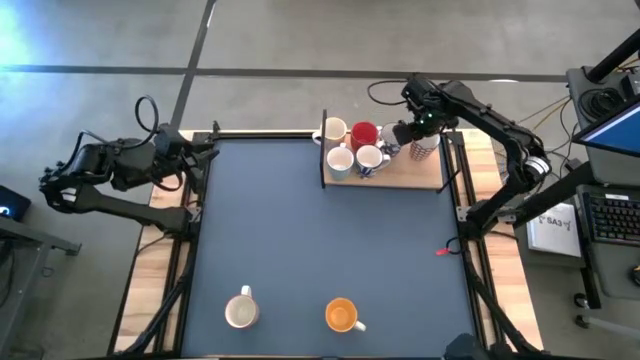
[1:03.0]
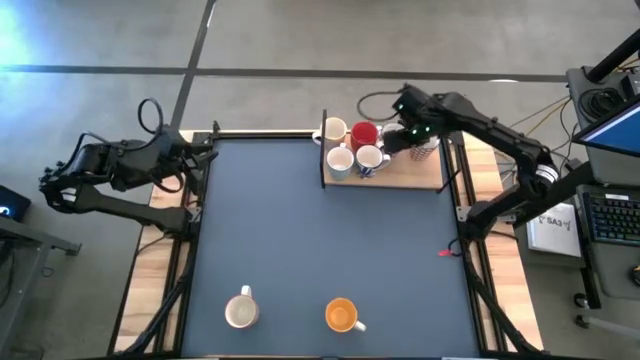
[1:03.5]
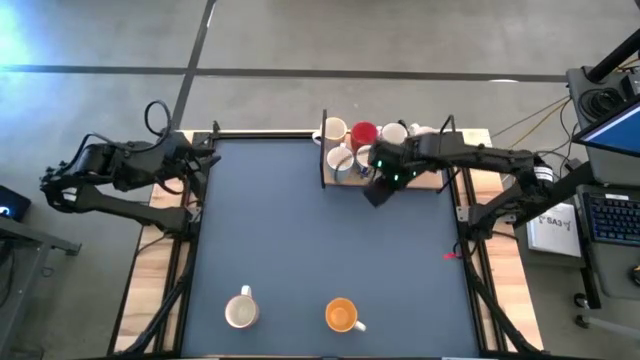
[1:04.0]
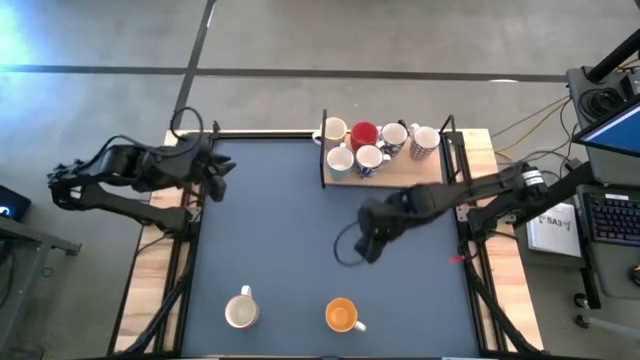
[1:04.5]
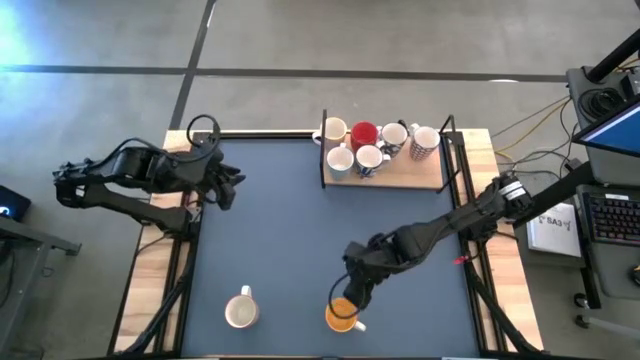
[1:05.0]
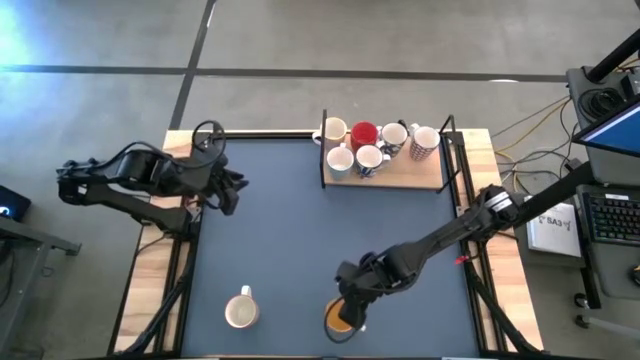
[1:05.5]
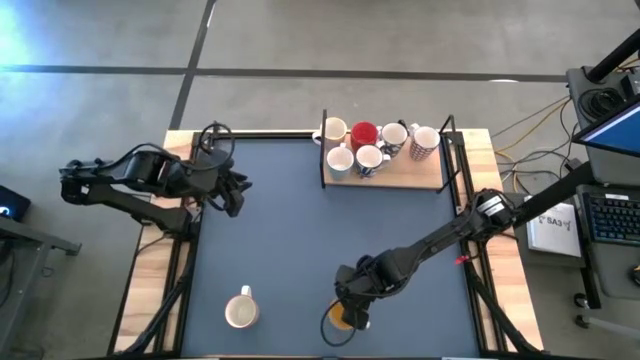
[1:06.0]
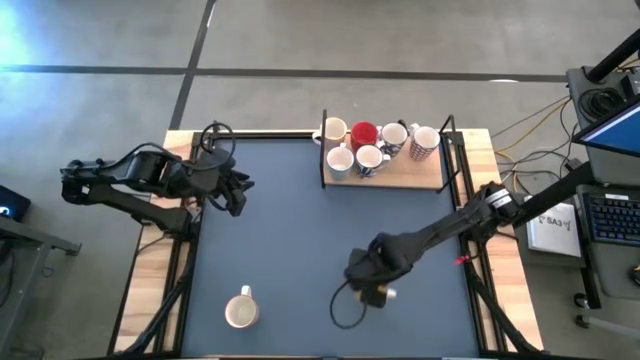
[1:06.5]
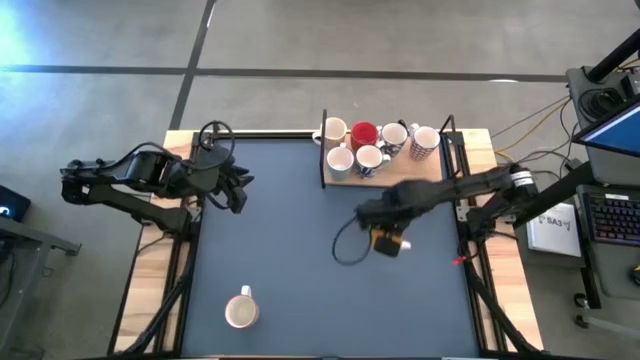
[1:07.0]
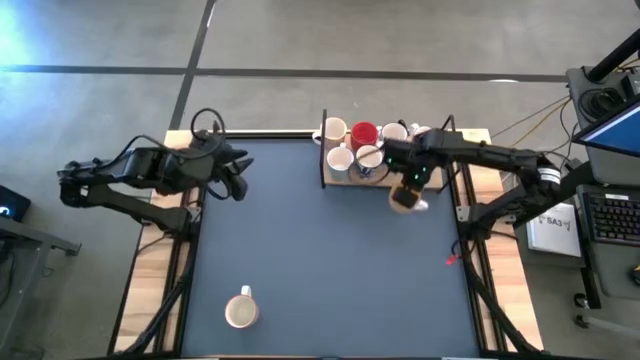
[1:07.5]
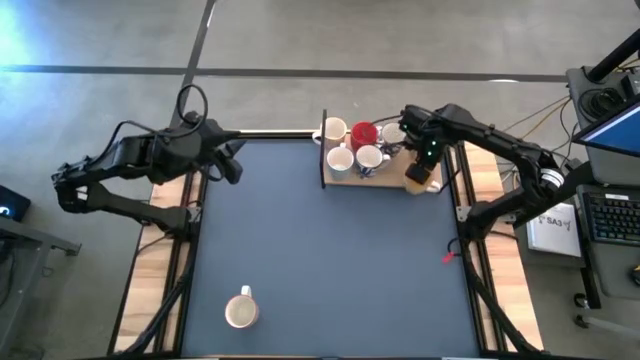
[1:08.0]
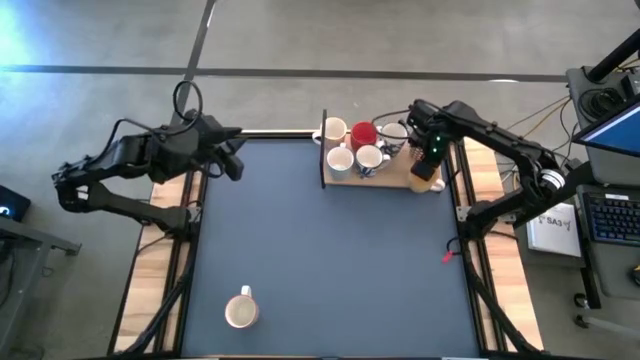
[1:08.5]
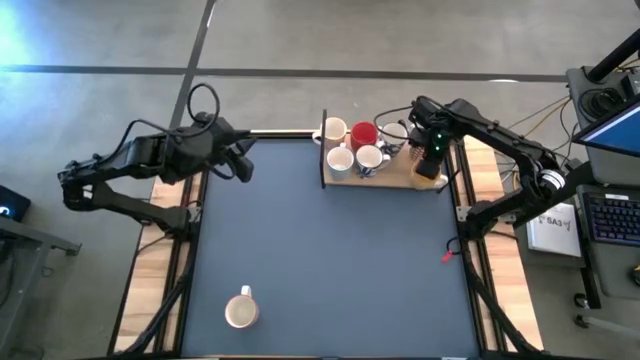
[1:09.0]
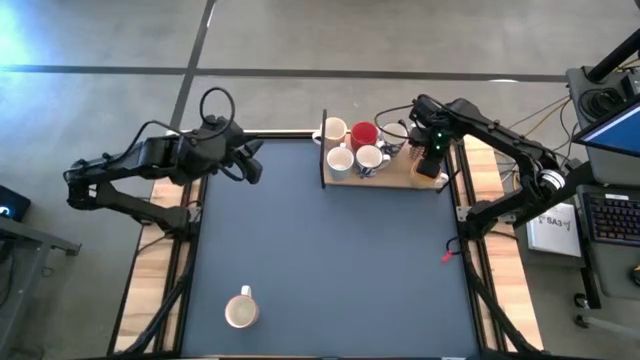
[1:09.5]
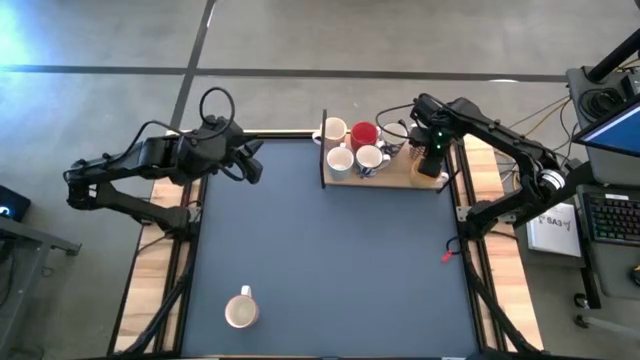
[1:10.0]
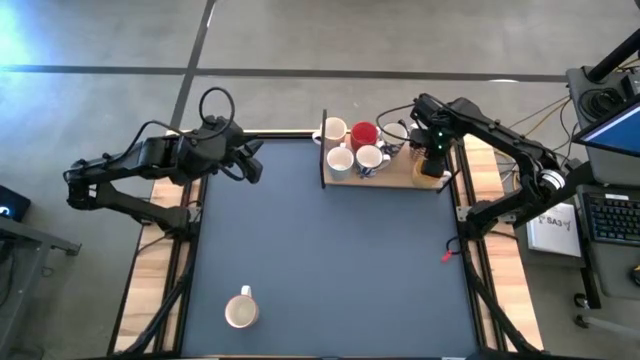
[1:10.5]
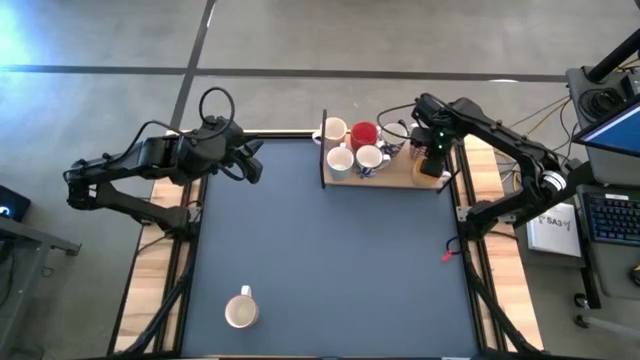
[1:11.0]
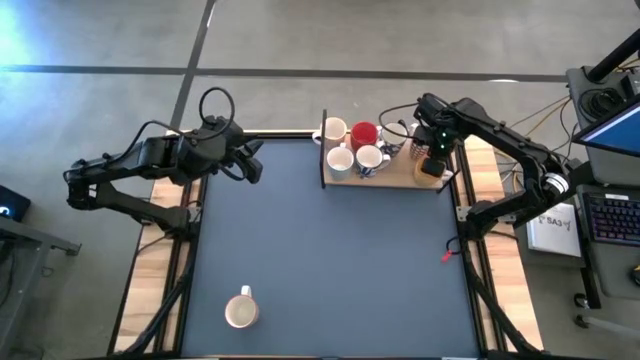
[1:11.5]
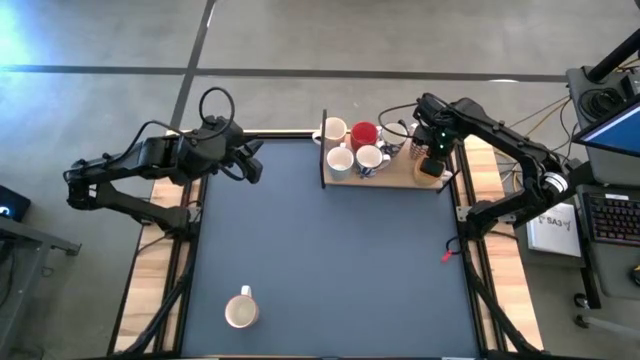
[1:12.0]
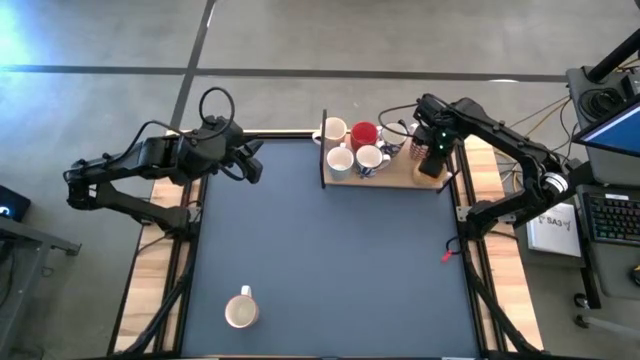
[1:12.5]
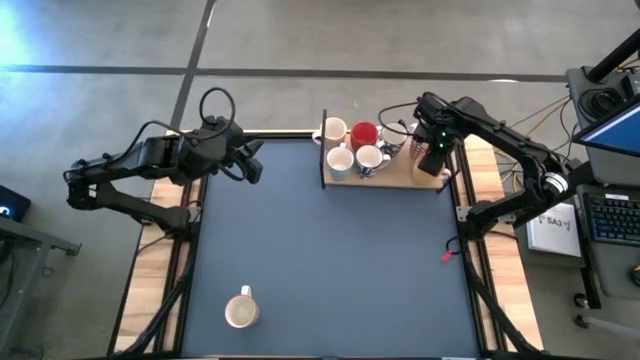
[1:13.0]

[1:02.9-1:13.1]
Task: Place coffee mugs
Put the yellow mug on the shelf

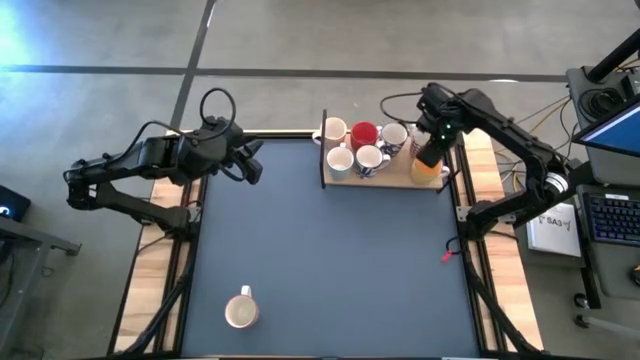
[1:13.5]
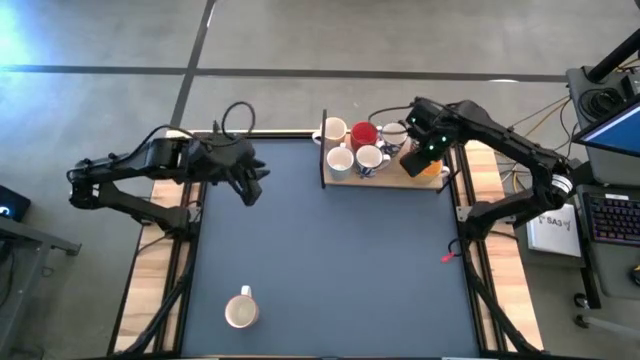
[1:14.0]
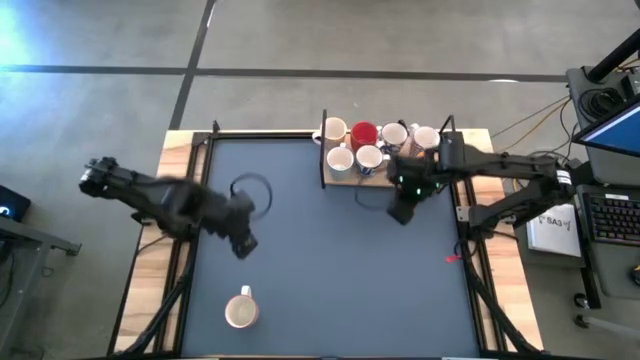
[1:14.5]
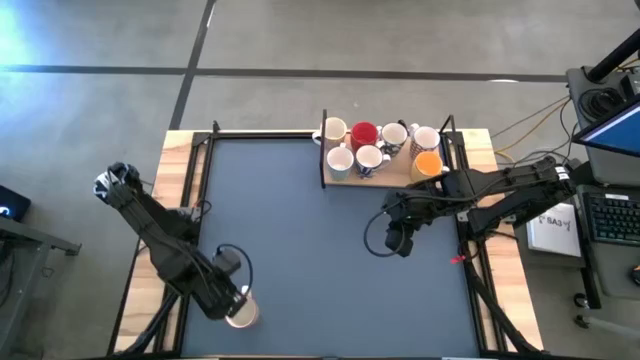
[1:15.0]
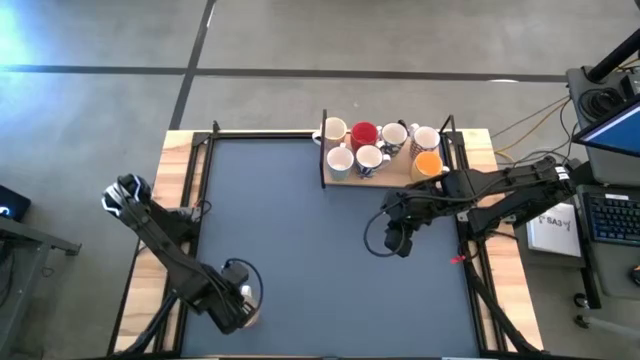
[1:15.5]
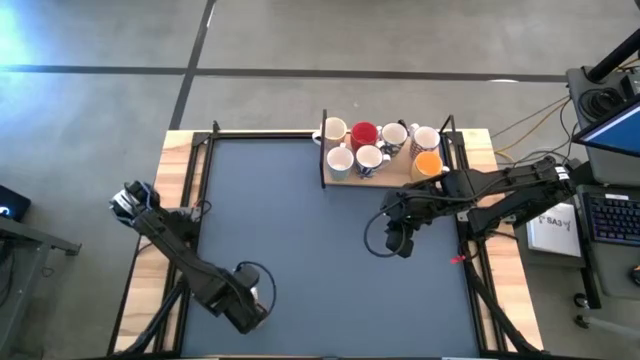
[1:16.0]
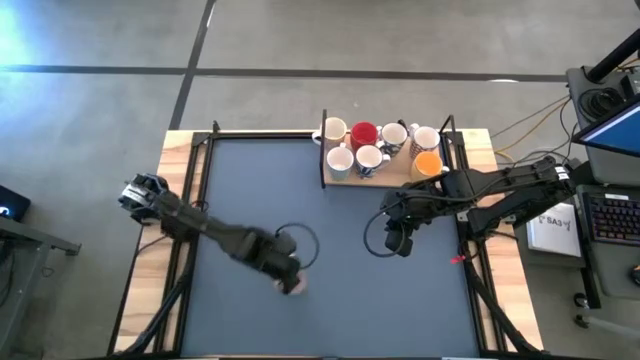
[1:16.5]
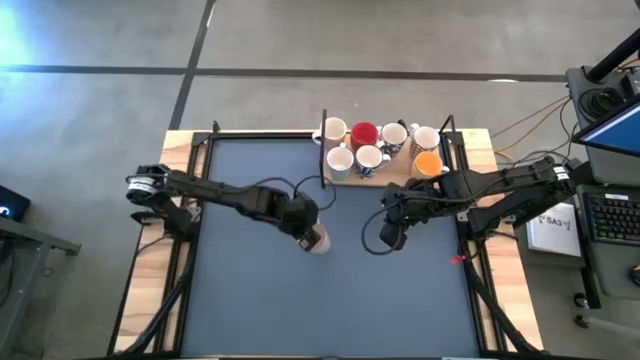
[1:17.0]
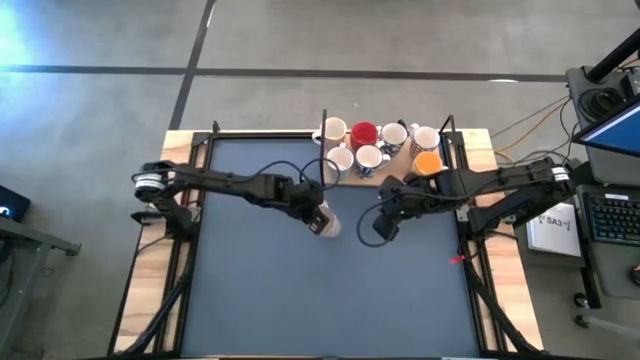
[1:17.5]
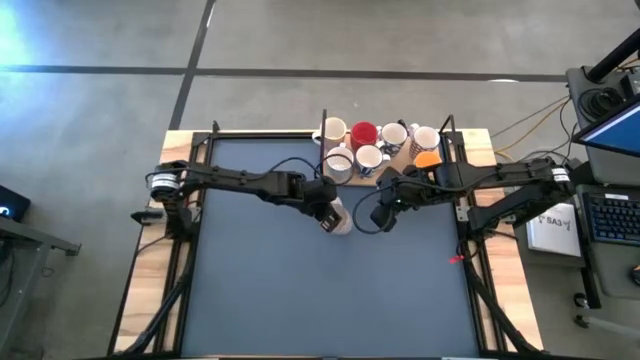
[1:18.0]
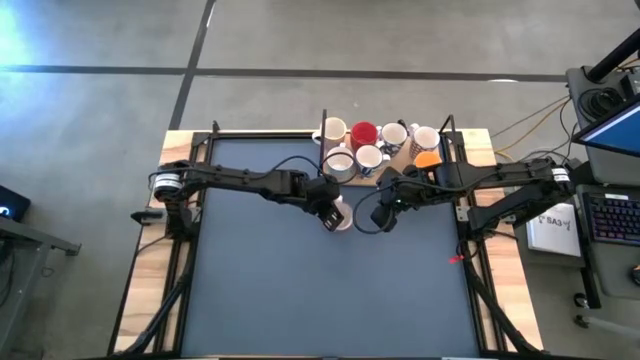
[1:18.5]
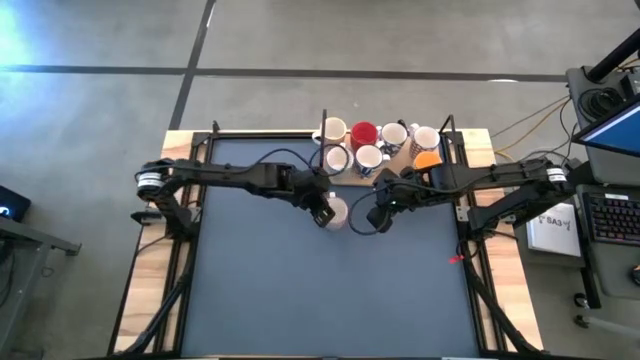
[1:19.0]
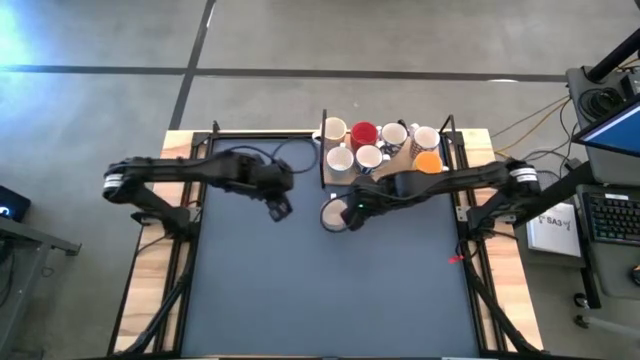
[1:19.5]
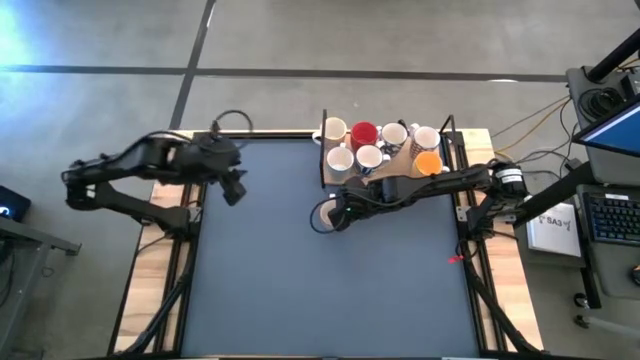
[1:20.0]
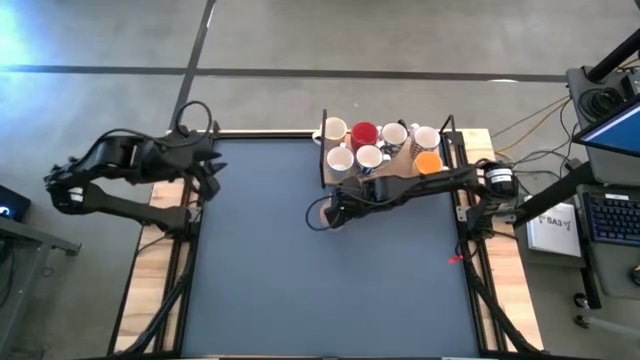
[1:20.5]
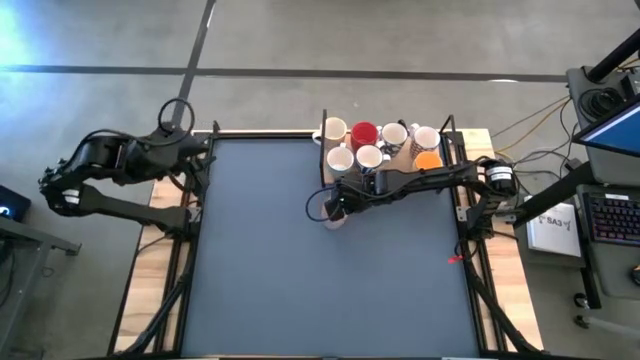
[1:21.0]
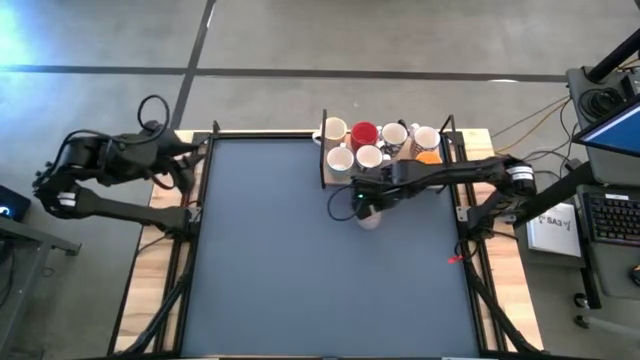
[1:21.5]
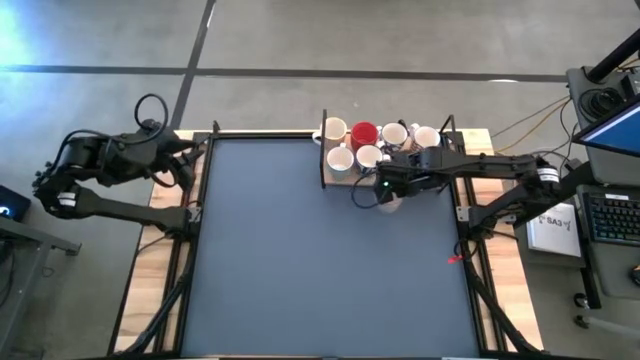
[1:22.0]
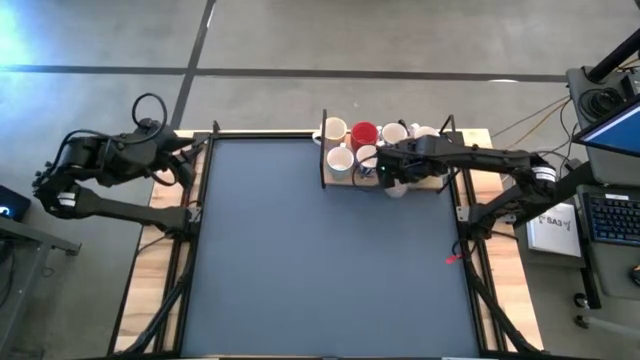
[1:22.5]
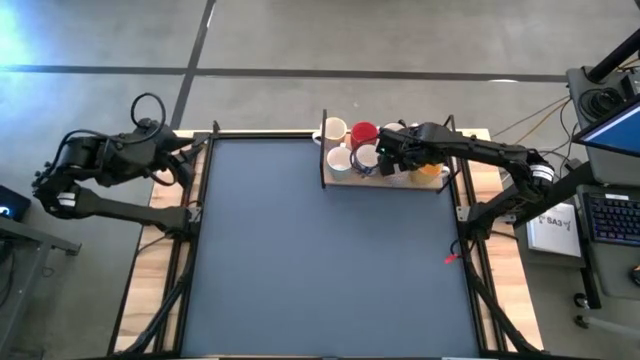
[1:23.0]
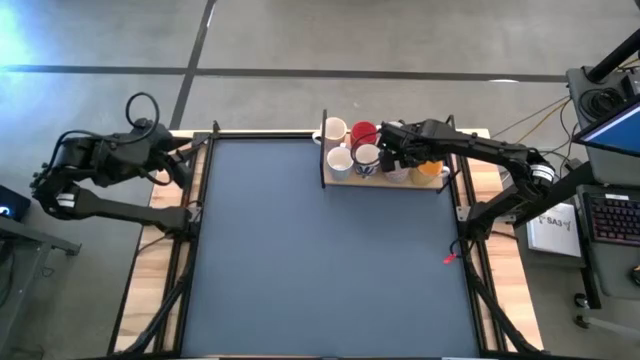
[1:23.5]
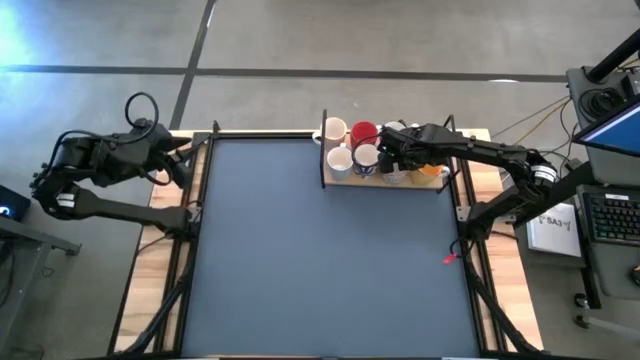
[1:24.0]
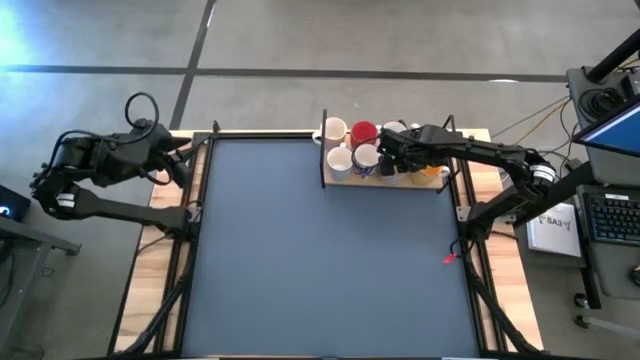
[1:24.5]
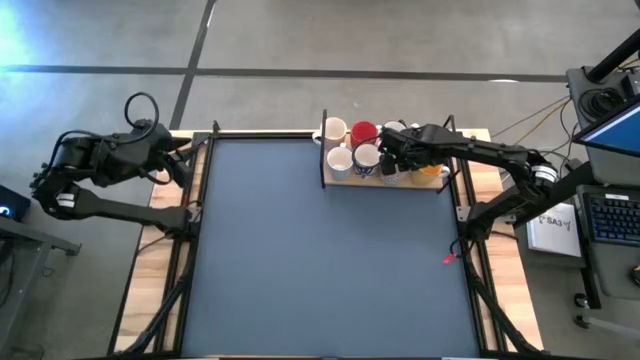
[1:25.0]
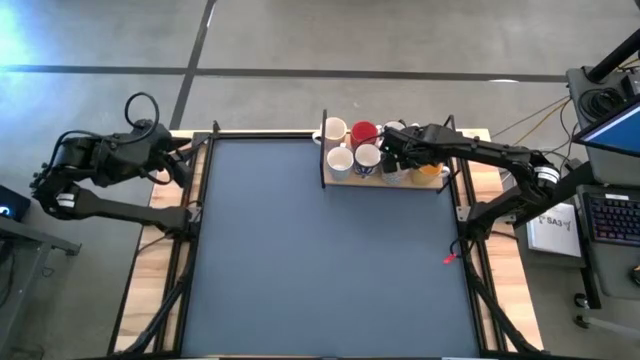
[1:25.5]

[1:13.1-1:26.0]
Put the gray mug on the shelf
